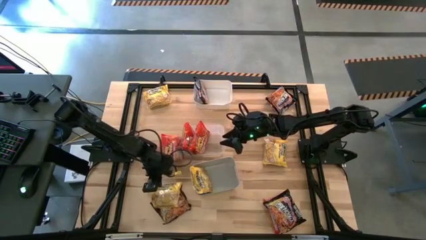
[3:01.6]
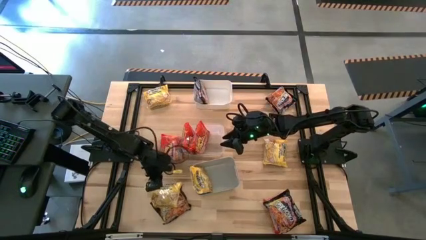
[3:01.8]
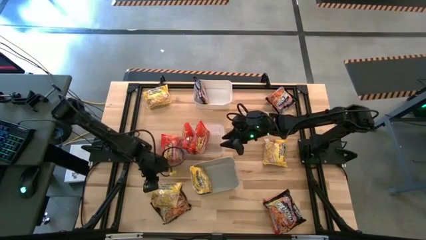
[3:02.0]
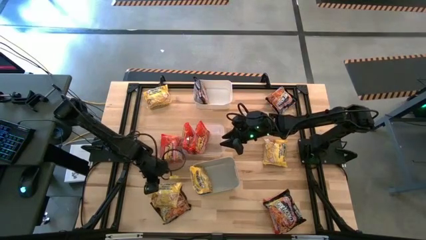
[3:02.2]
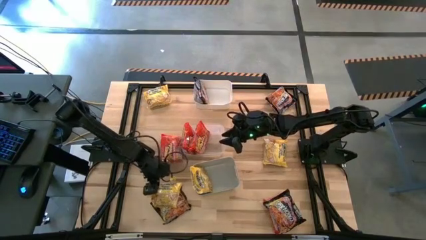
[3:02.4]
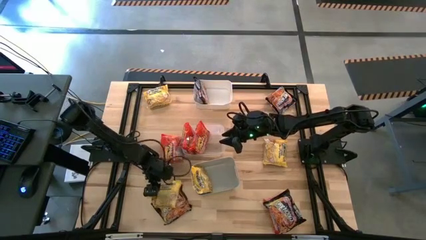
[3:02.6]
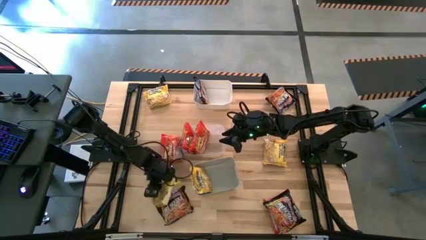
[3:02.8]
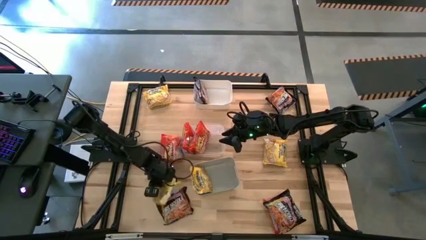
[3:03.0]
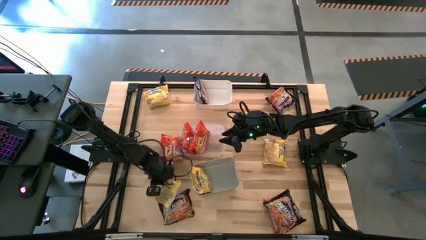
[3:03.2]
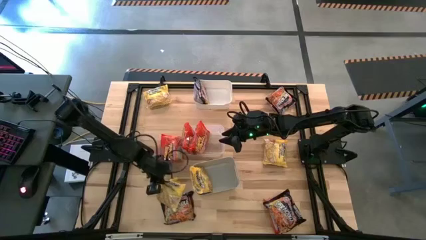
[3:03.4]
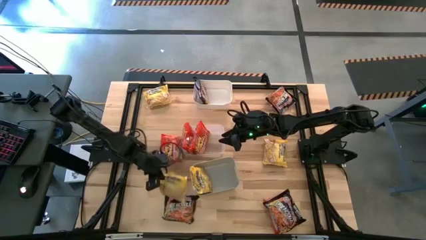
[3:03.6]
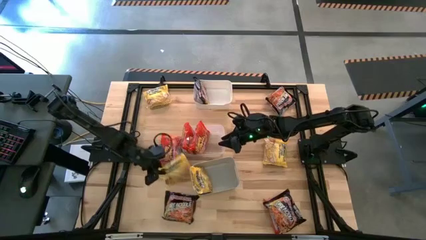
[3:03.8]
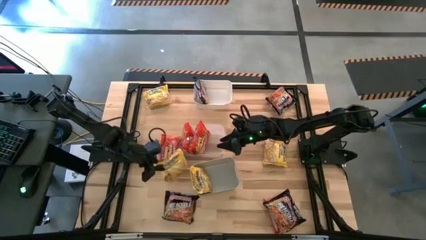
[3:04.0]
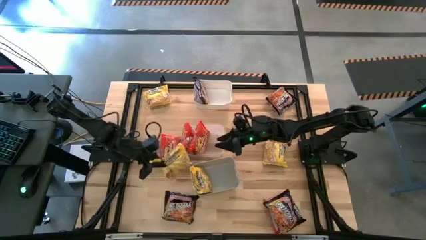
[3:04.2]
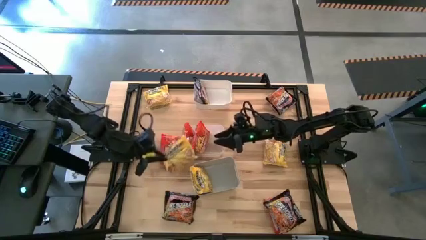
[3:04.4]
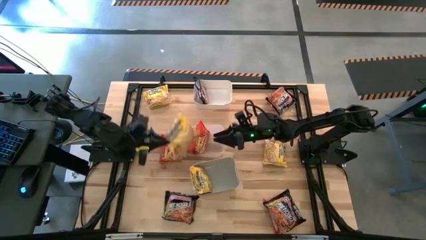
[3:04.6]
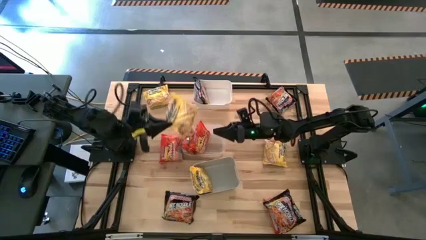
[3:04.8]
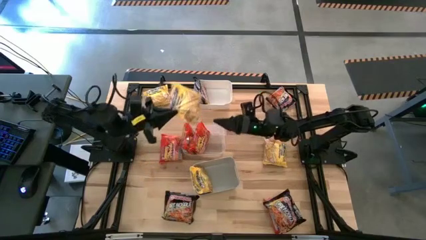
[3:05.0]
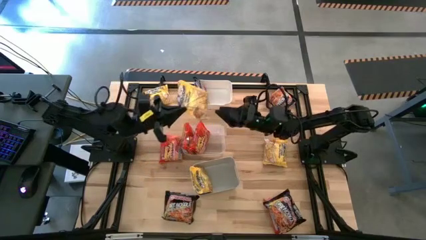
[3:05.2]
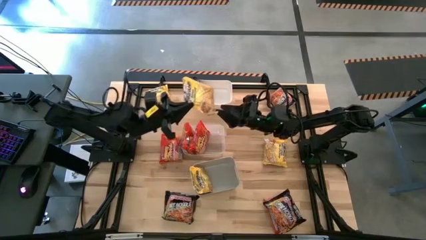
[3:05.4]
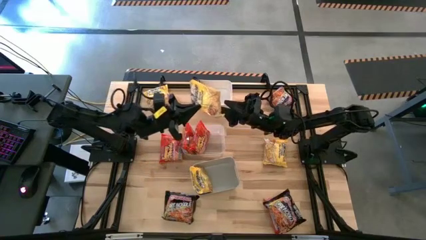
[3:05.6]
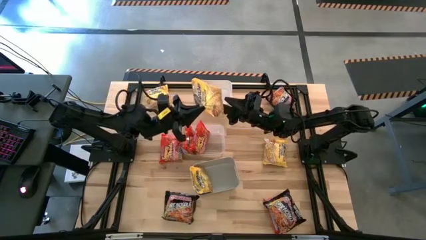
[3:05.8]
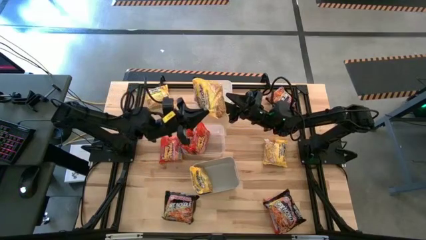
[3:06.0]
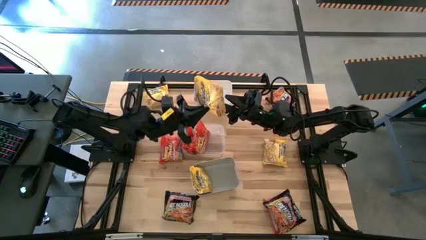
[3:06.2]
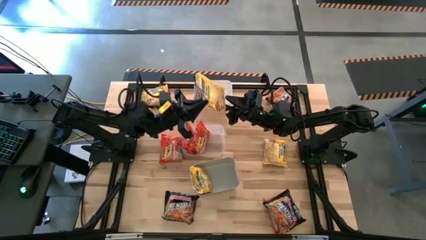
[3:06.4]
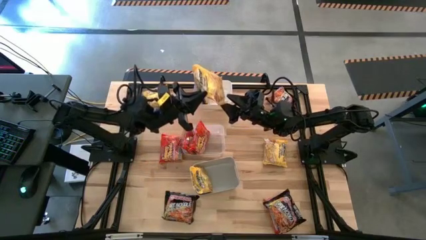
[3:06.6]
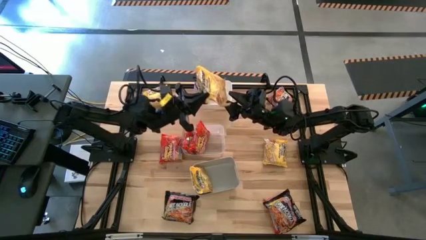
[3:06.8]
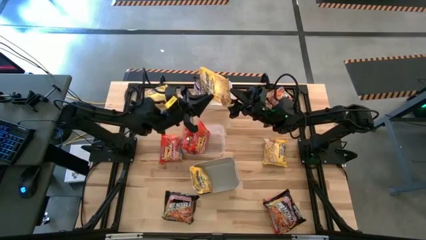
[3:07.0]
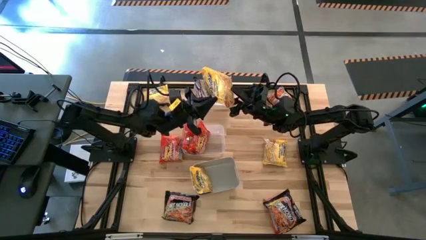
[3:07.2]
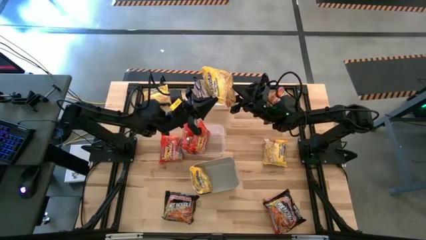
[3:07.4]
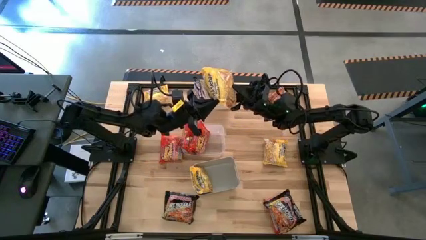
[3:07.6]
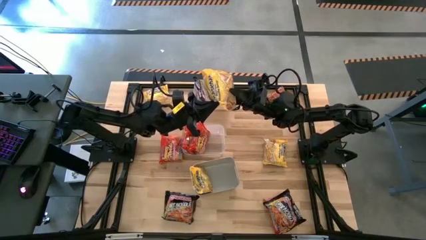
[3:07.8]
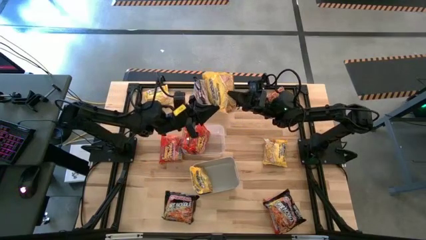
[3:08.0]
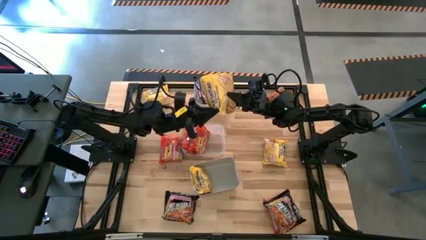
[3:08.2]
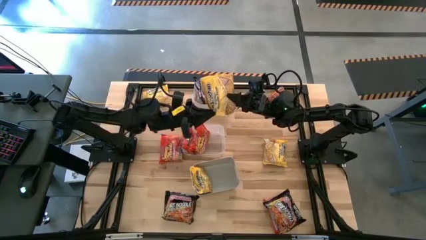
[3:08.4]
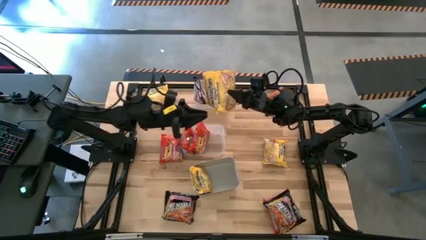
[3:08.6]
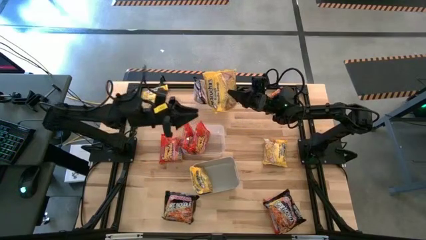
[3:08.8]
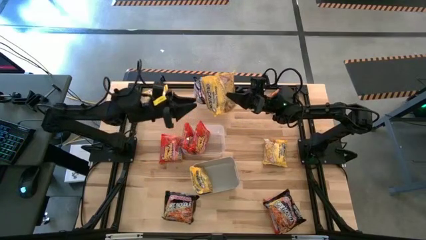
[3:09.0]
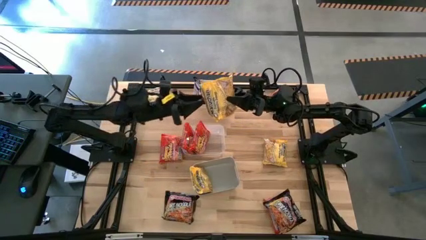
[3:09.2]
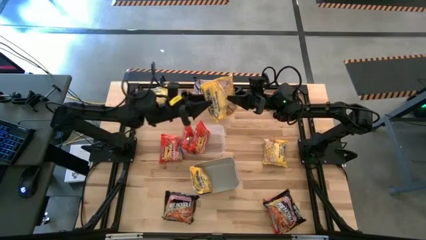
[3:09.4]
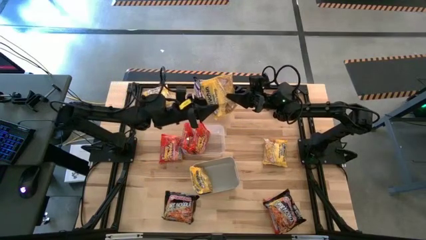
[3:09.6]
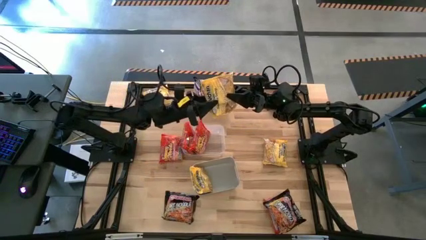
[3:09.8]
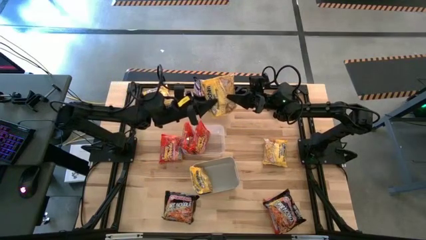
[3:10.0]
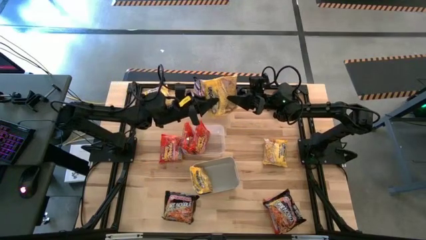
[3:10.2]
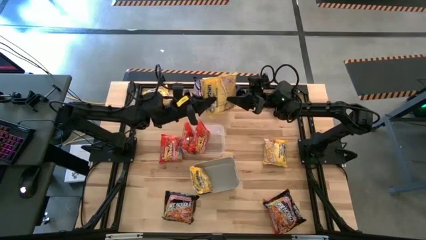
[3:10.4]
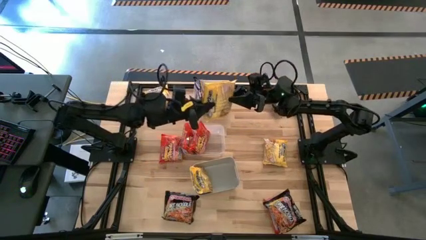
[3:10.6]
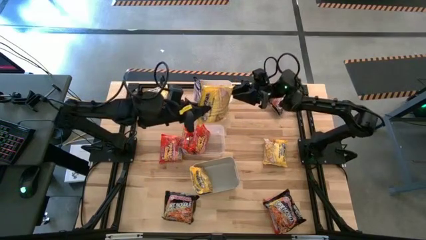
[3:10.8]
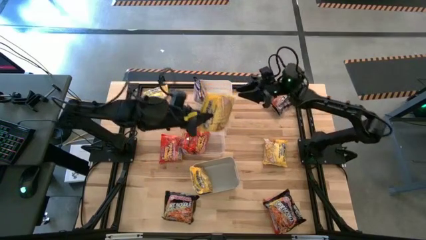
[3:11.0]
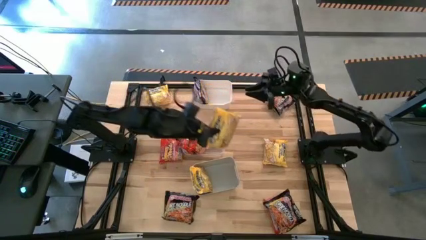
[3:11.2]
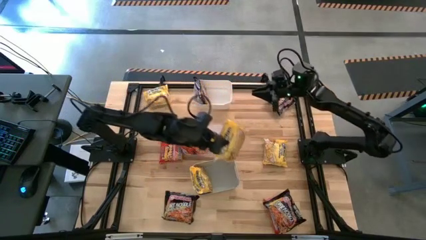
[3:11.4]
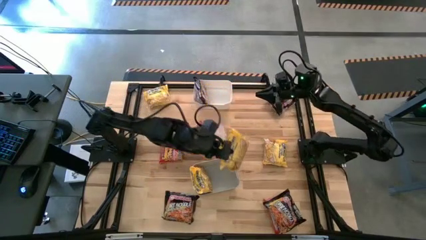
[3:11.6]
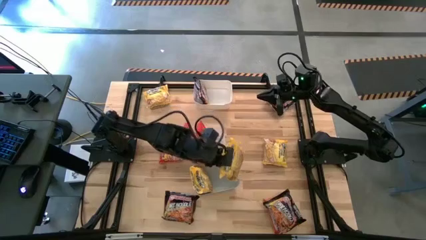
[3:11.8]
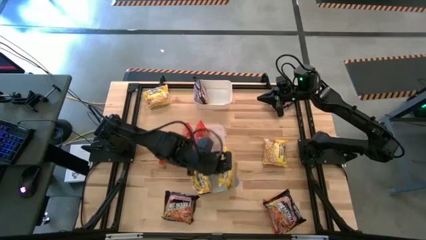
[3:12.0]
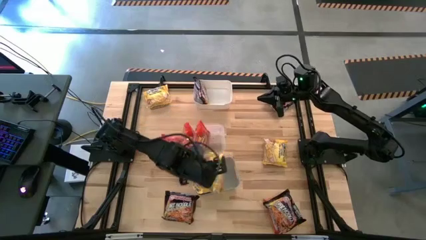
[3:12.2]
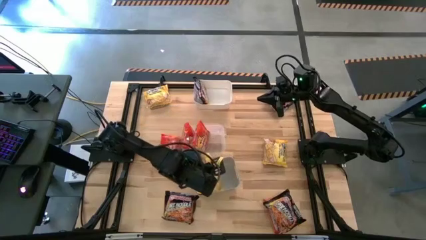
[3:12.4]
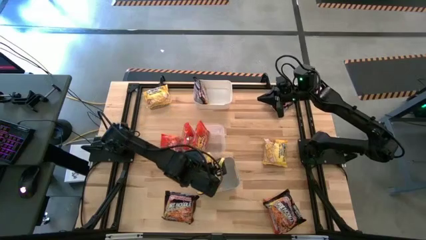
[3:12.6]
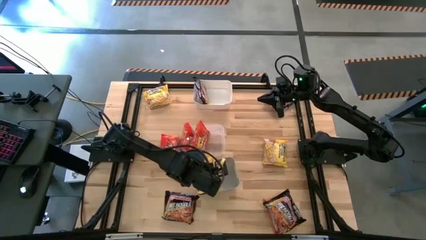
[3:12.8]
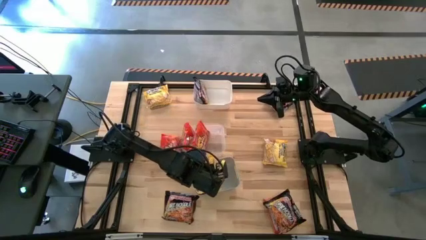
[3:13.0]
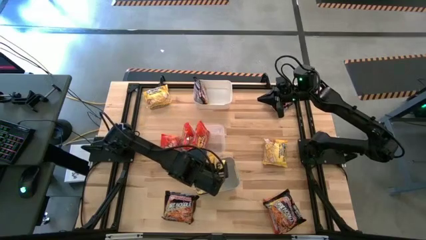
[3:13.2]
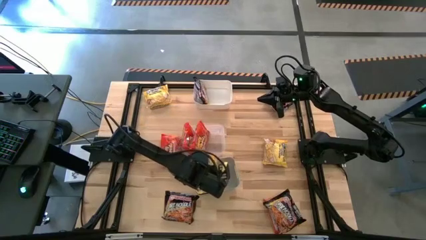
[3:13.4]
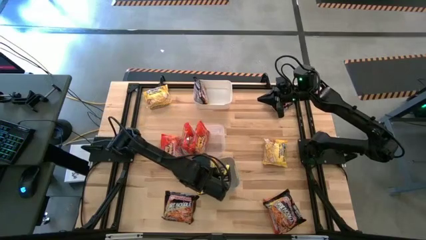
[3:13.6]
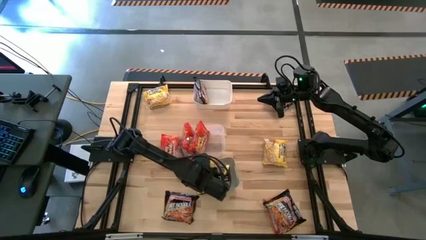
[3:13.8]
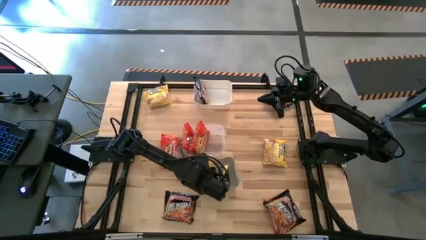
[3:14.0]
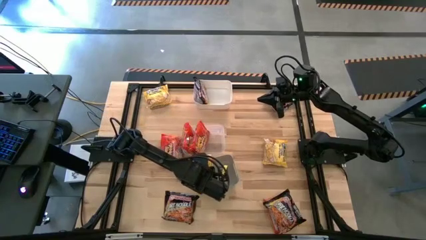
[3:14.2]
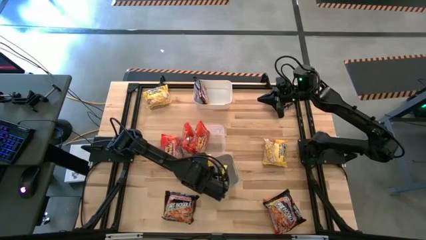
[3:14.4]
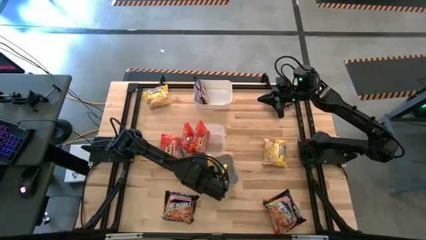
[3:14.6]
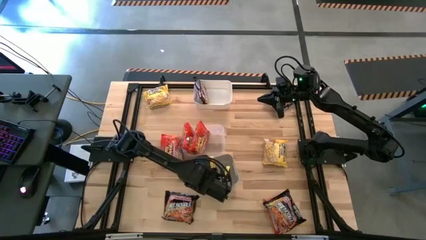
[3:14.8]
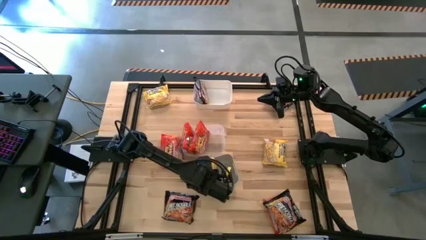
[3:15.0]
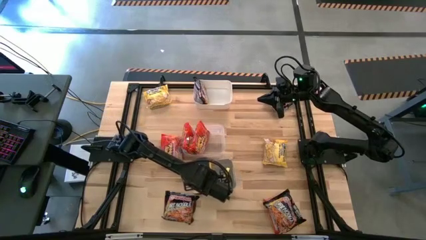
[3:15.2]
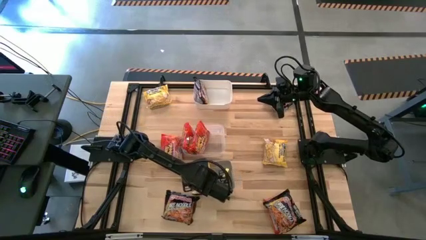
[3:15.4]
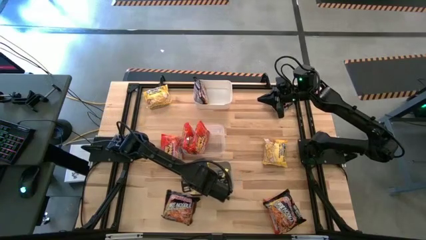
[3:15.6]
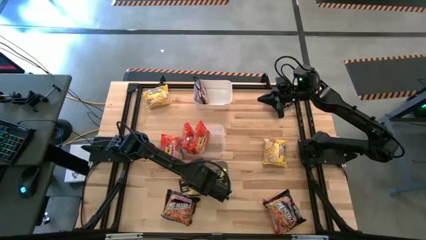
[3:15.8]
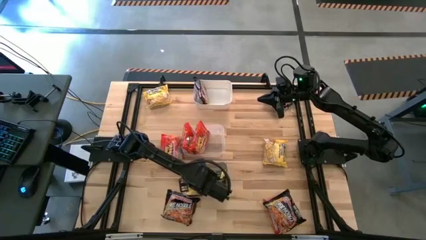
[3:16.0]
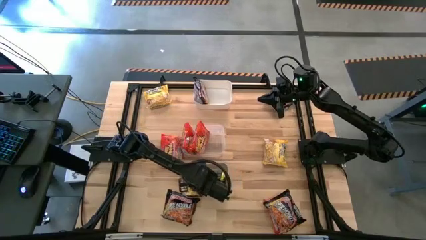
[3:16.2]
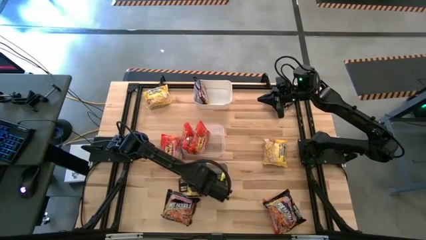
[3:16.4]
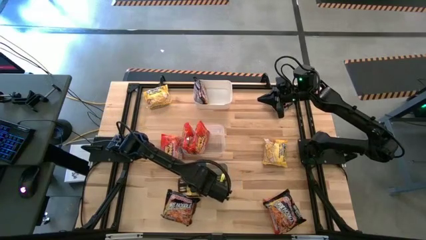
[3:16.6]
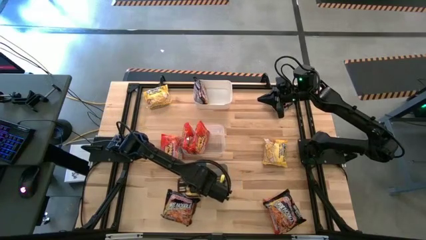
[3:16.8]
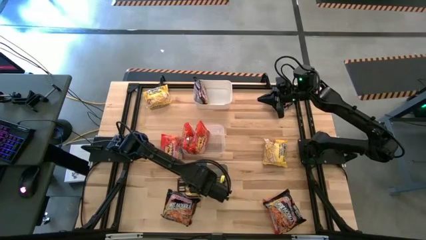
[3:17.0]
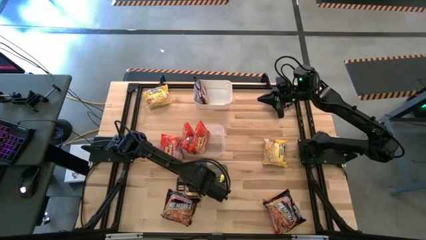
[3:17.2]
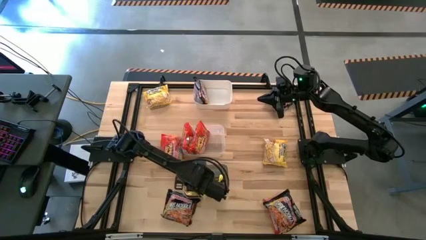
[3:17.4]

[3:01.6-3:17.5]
Task: Sort Maruchan noodles
Put the yellow noodle pack into the gray bin
